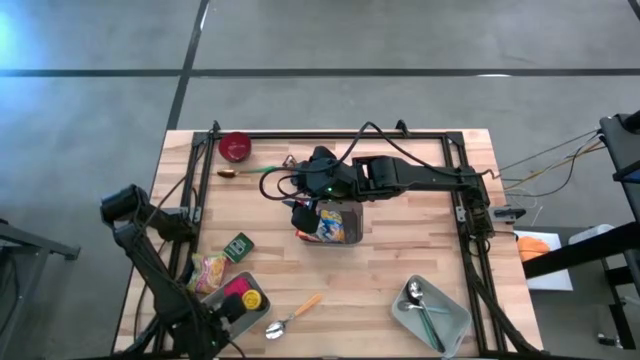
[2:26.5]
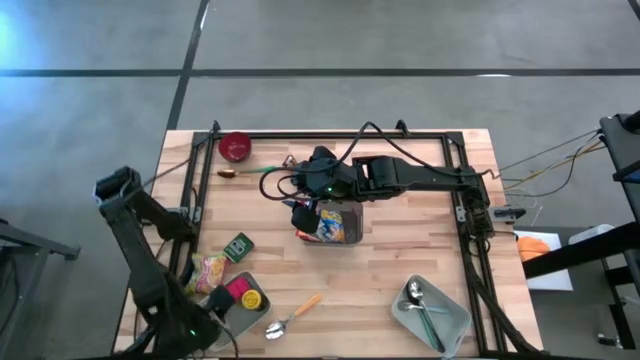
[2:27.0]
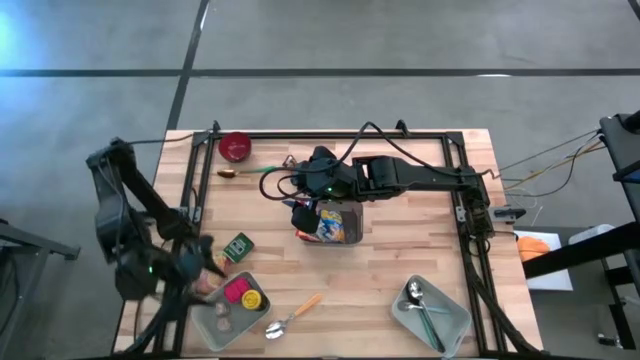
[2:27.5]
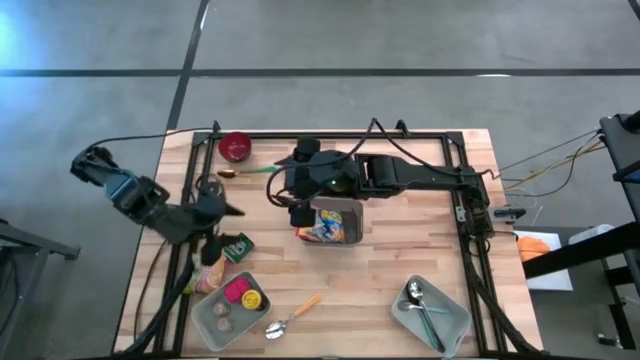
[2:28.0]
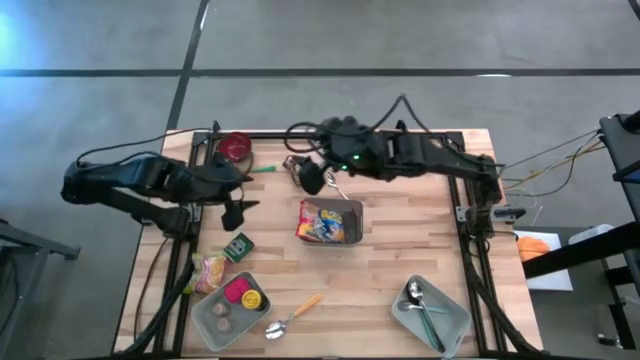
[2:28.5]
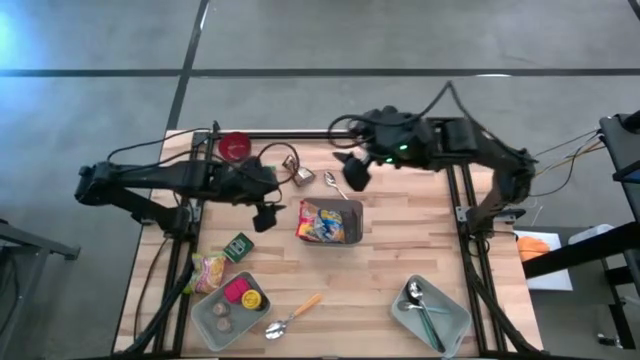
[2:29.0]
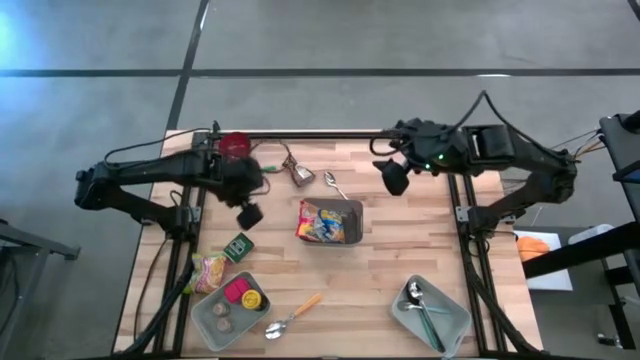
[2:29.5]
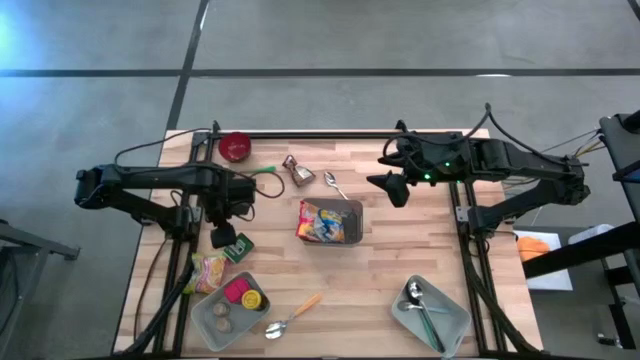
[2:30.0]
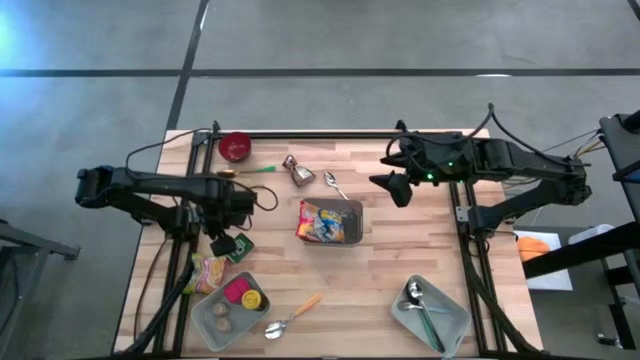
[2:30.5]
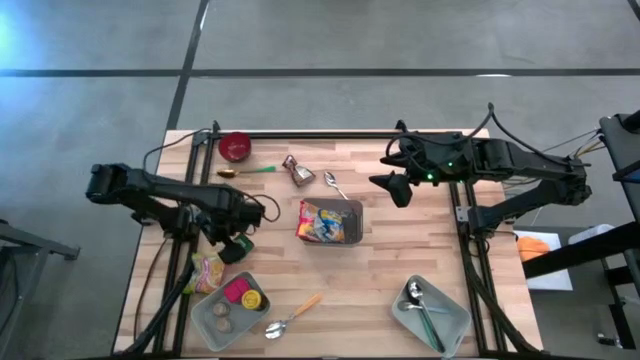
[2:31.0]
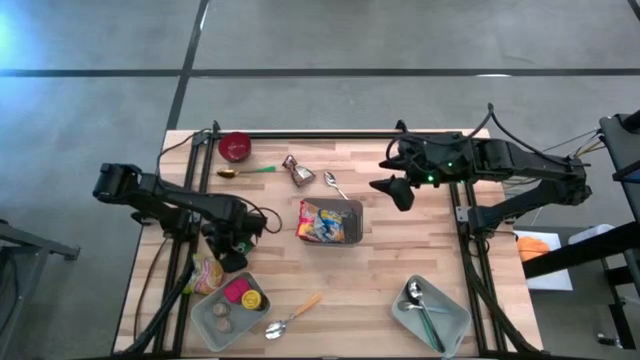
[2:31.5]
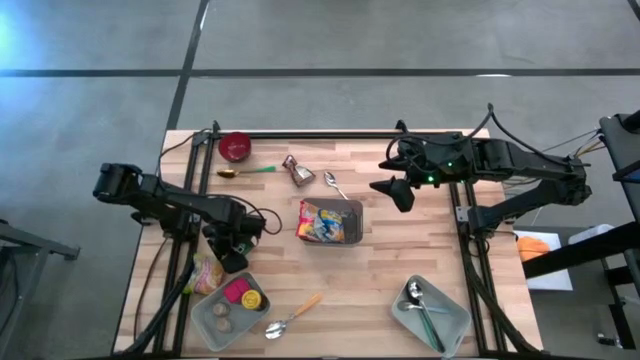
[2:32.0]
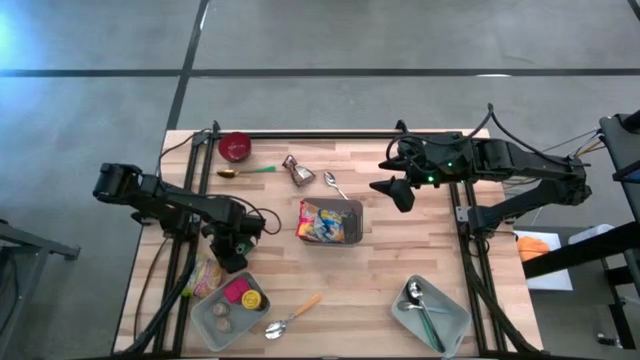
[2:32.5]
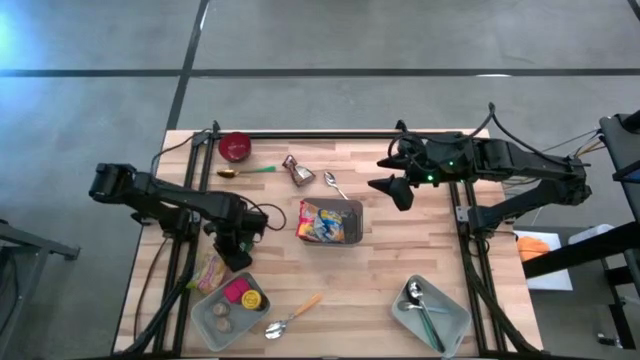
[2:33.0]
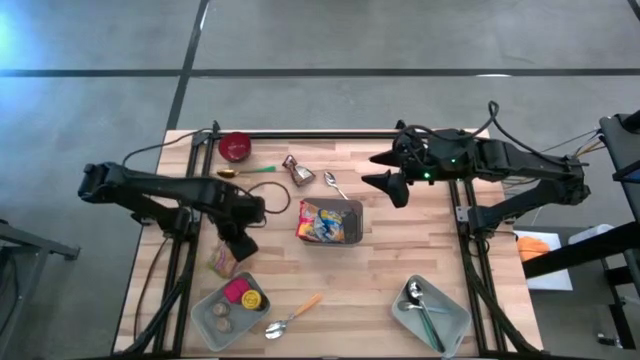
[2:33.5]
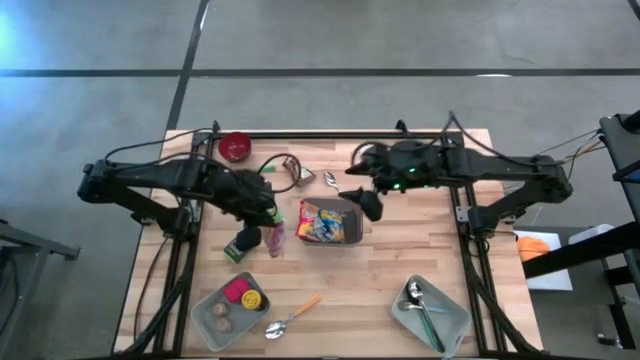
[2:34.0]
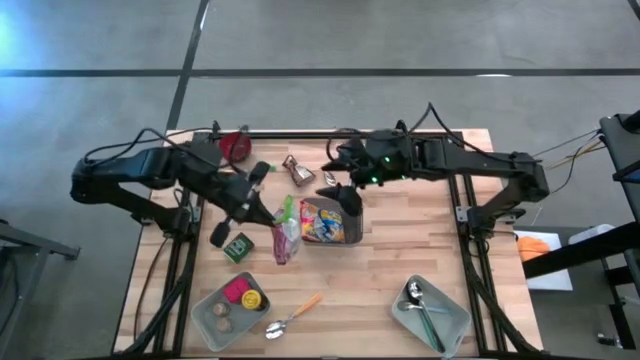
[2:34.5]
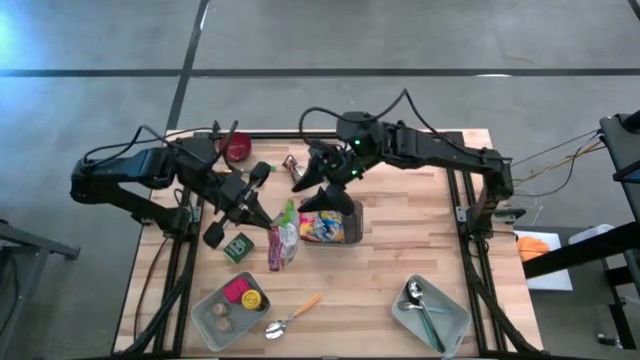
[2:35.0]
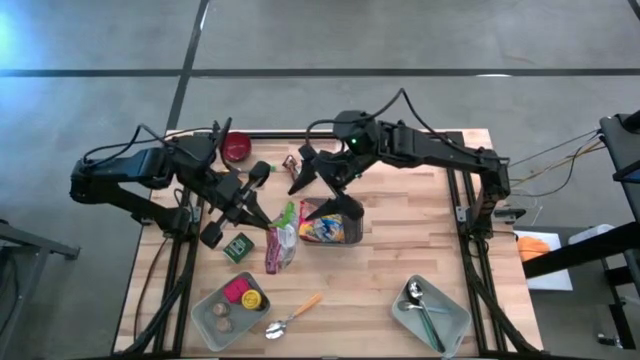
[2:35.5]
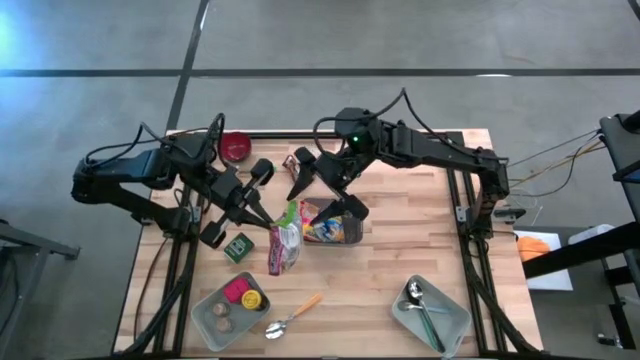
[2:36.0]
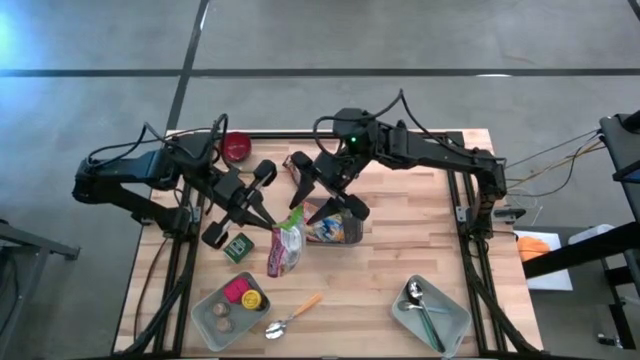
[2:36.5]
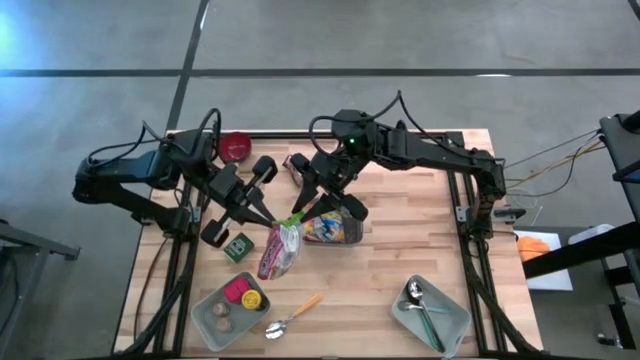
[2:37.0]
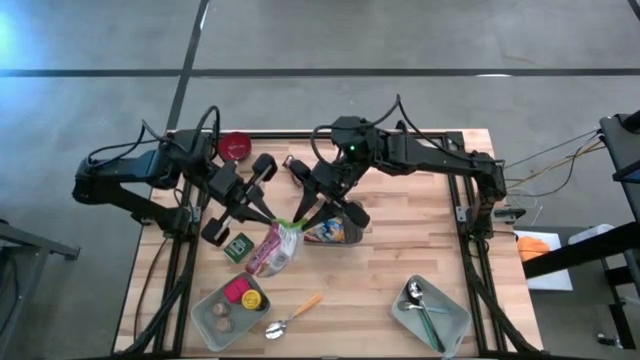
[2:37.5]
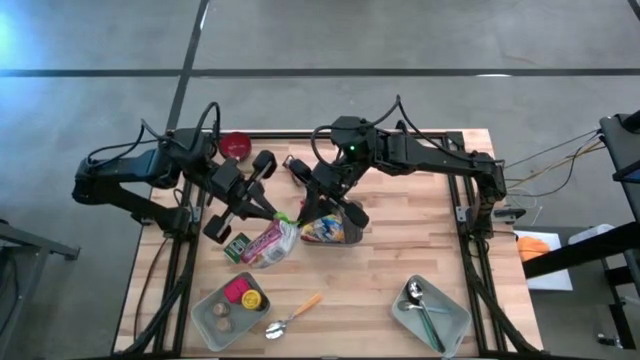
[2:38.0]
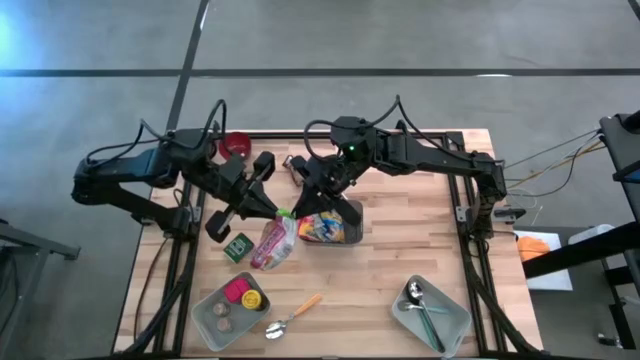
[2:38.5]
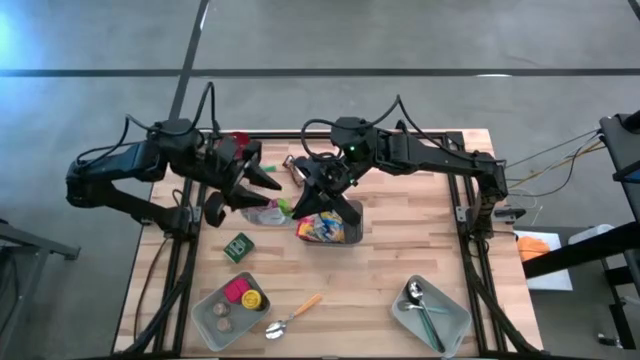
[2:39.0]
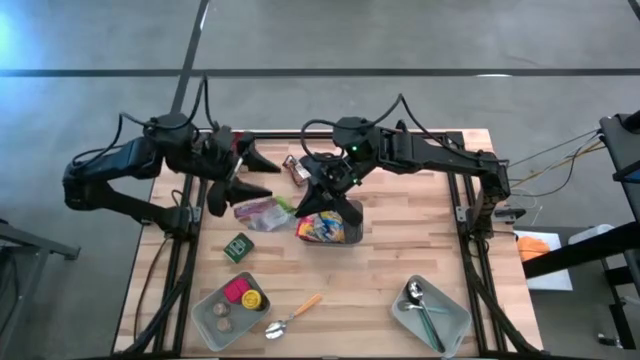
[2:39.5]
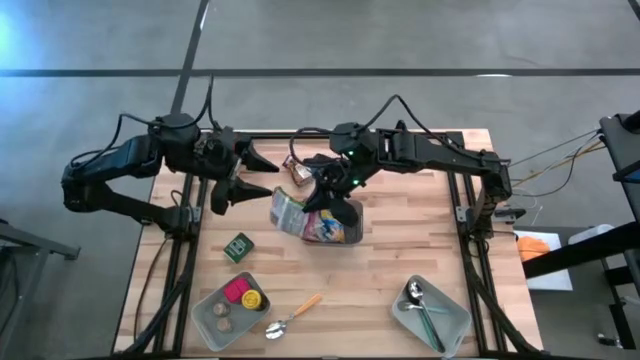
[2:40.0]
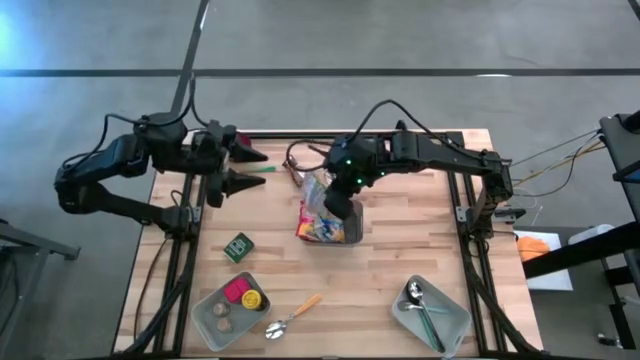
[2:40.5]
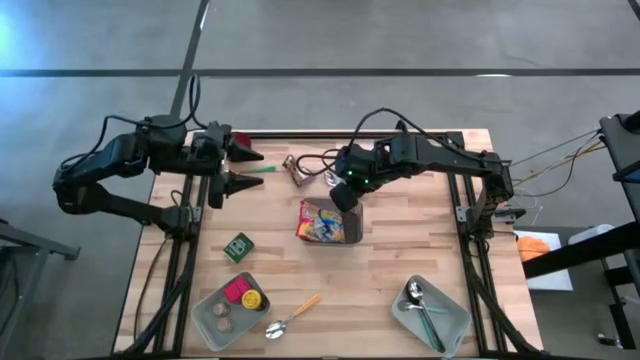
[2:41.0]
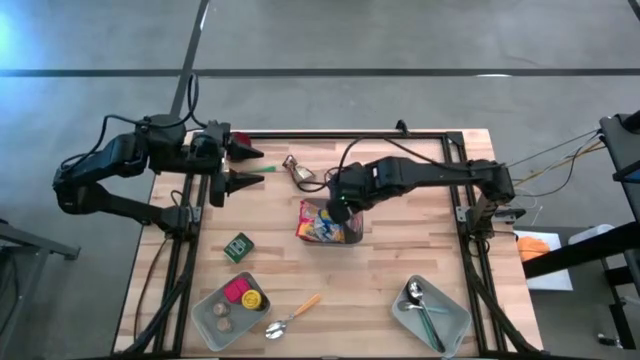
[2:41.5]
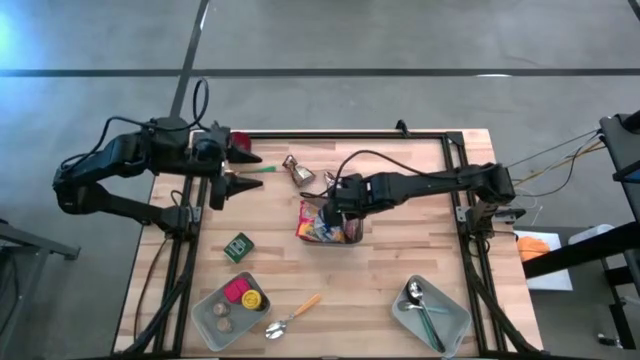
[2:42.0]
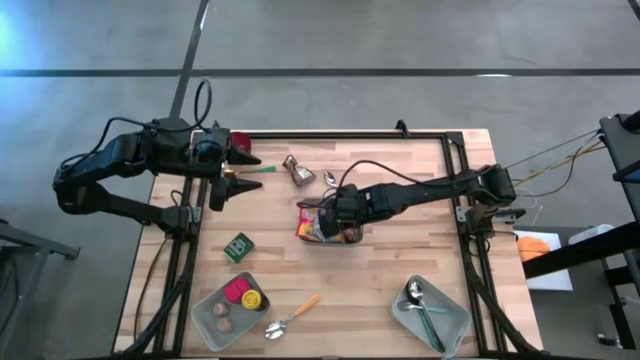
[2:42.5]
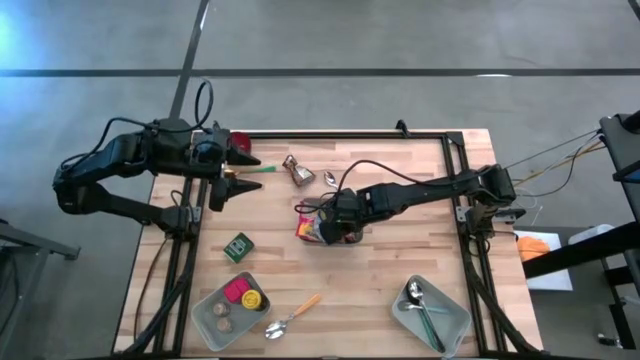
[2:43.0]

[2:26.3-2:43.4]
Put the green noodle pack into the black bin

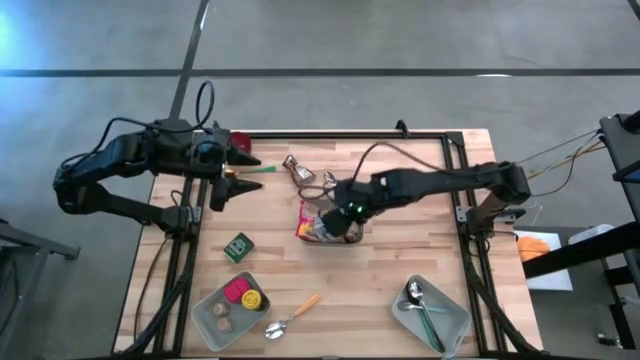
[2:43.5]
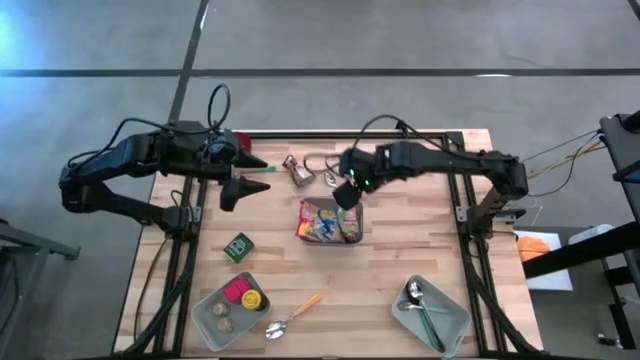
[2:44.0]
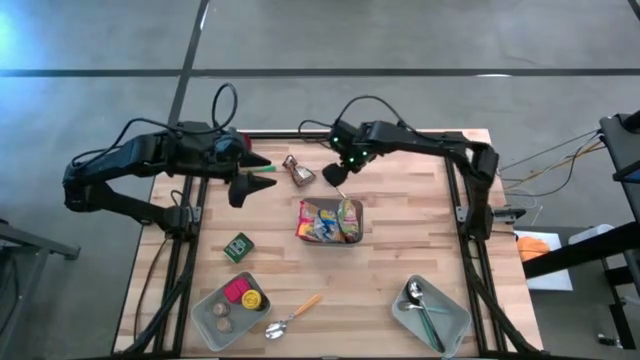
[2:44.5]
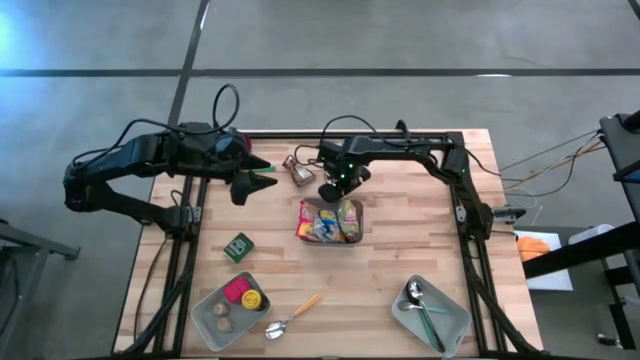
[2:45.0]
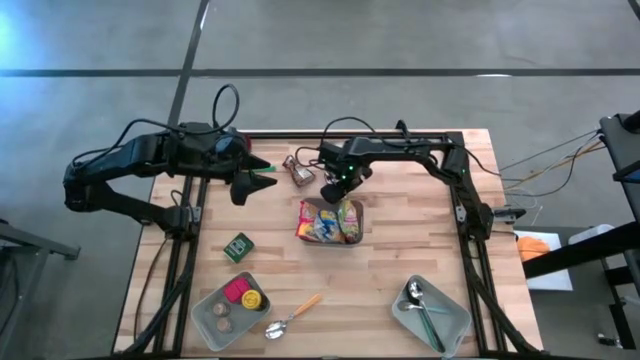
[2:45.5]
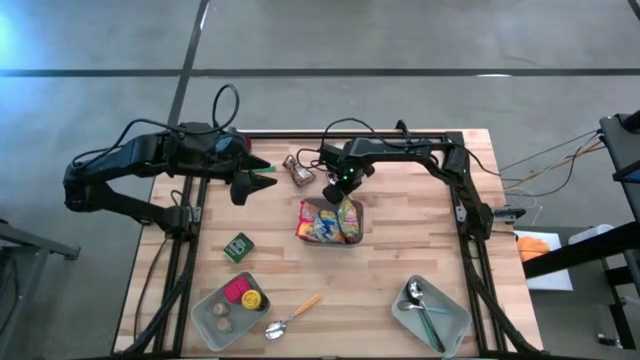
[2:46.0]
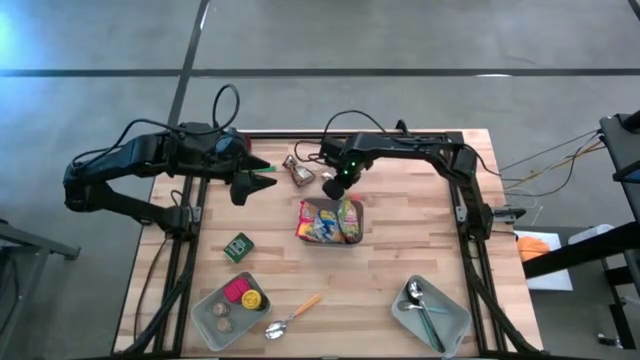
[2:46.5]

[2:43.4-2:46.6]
Put the orange spoon into the right grey bin
